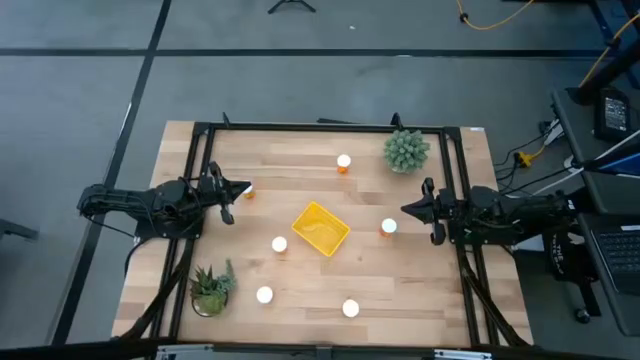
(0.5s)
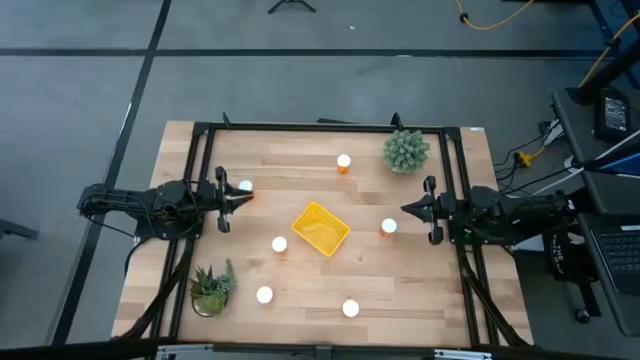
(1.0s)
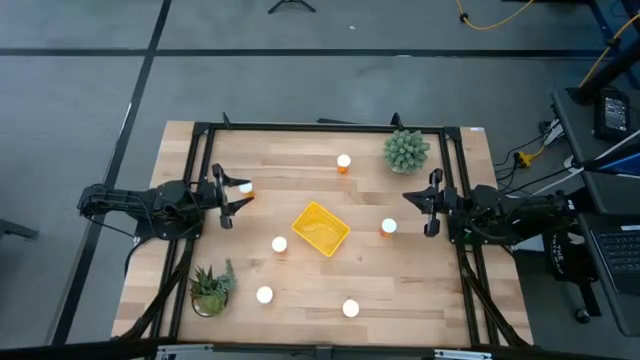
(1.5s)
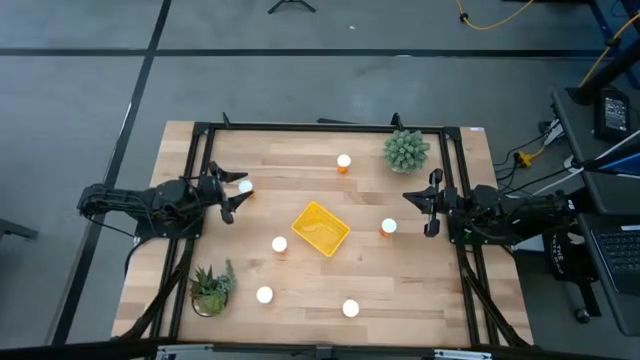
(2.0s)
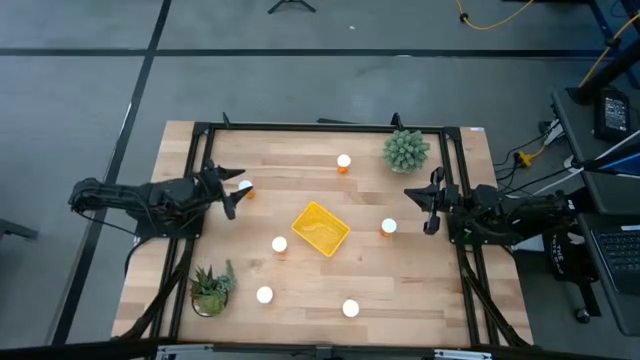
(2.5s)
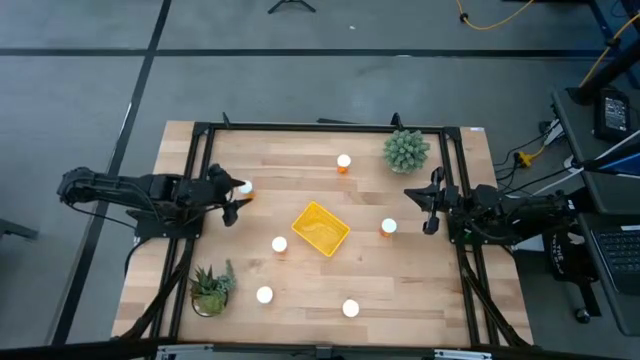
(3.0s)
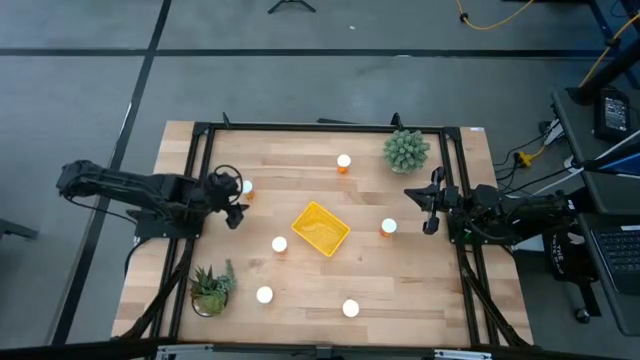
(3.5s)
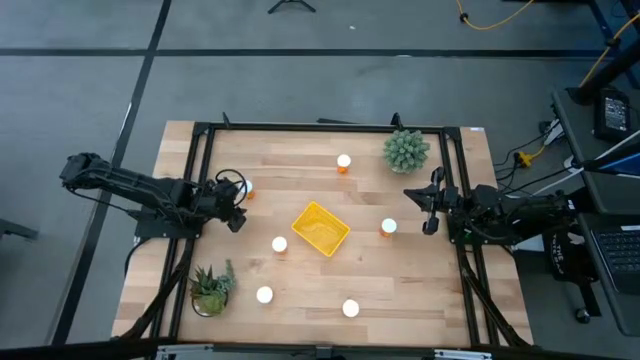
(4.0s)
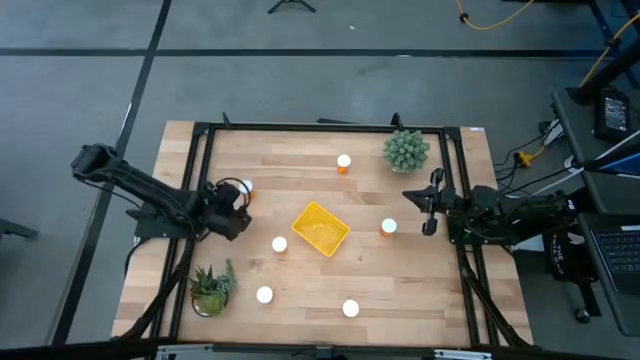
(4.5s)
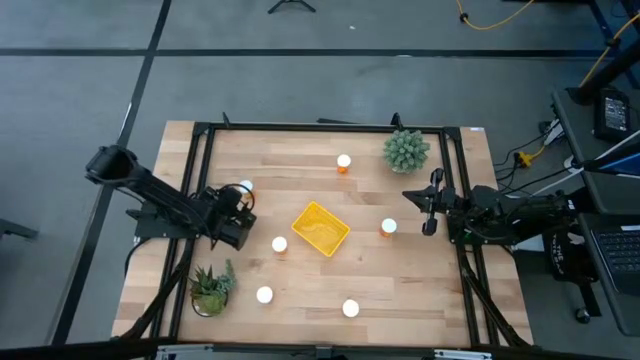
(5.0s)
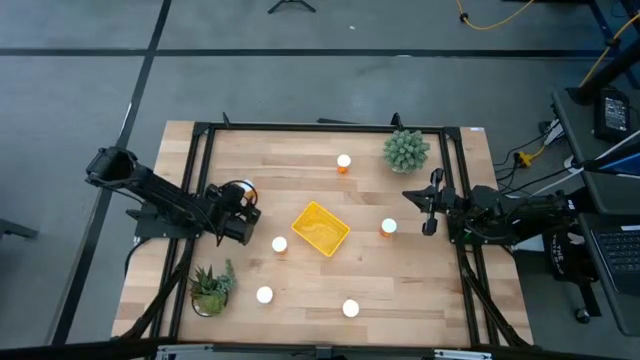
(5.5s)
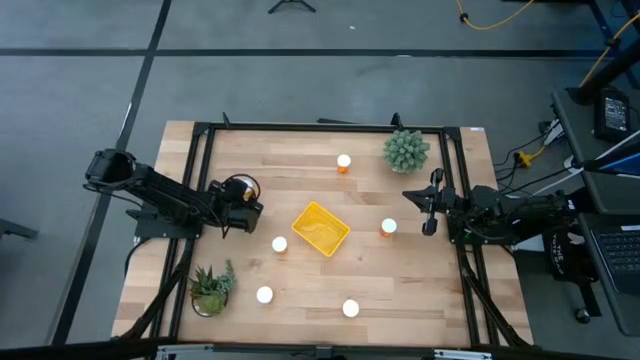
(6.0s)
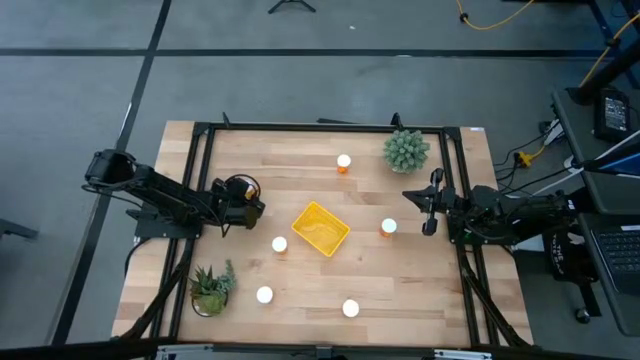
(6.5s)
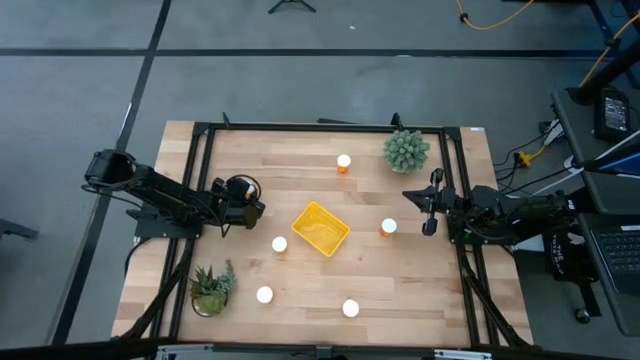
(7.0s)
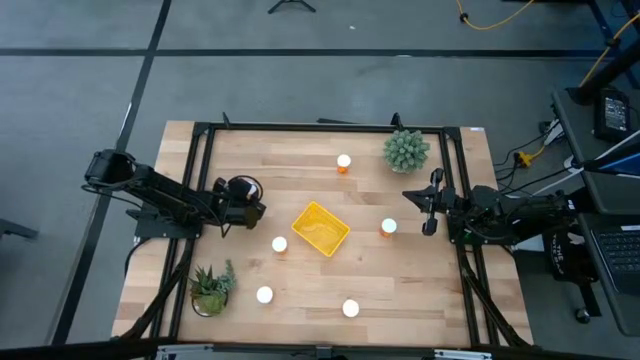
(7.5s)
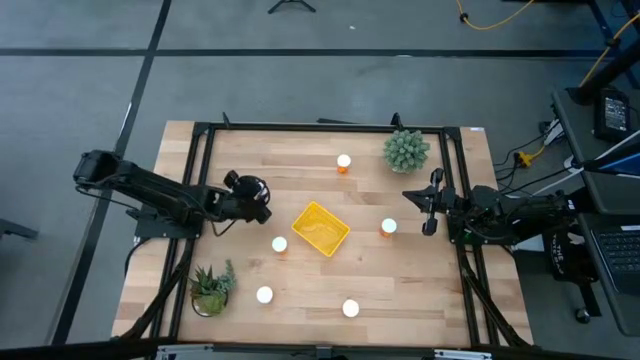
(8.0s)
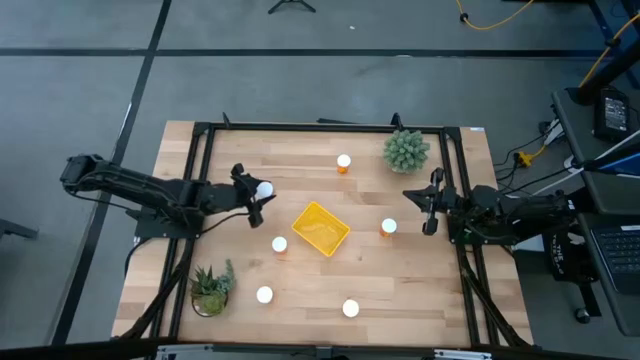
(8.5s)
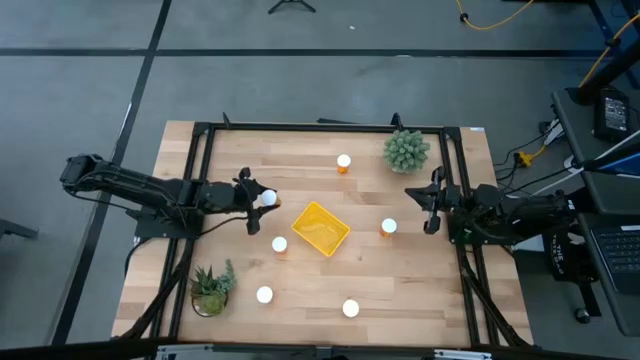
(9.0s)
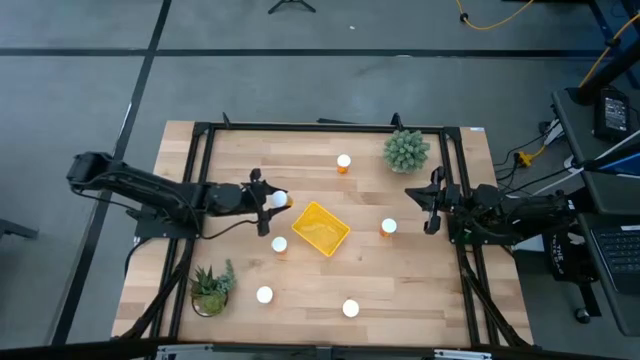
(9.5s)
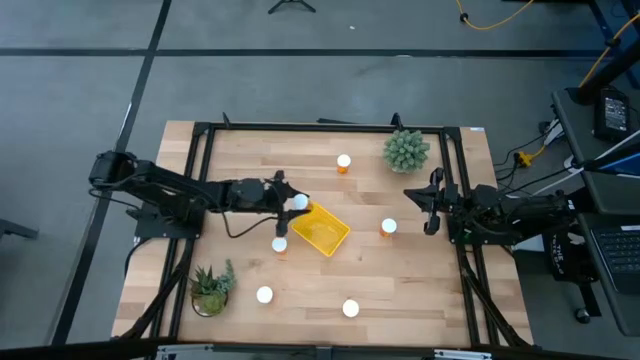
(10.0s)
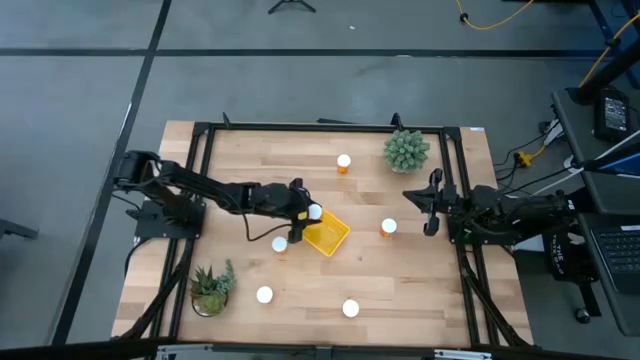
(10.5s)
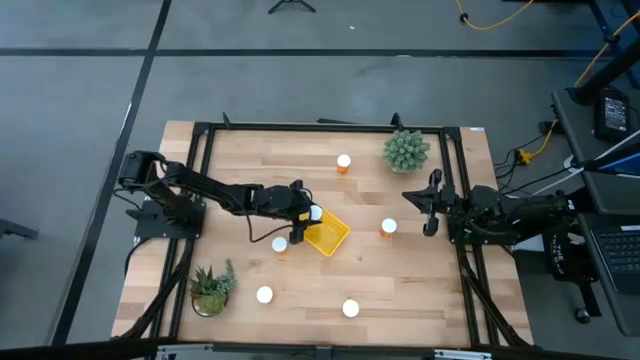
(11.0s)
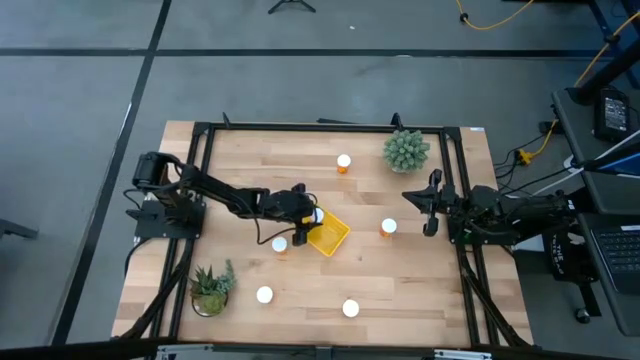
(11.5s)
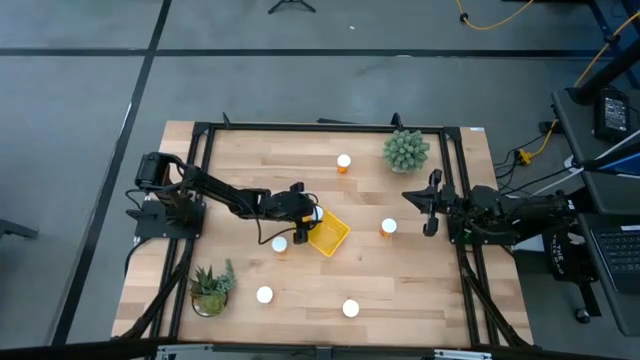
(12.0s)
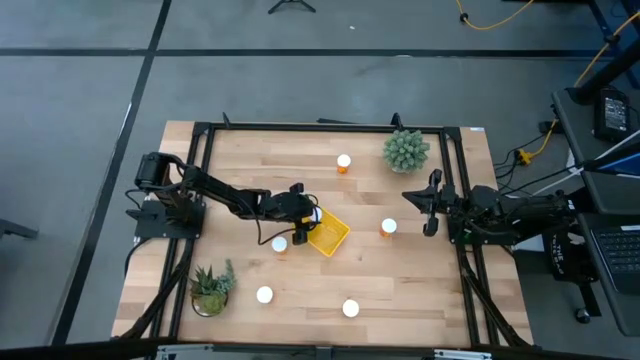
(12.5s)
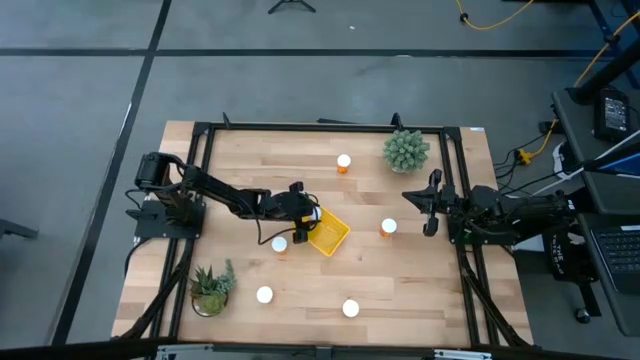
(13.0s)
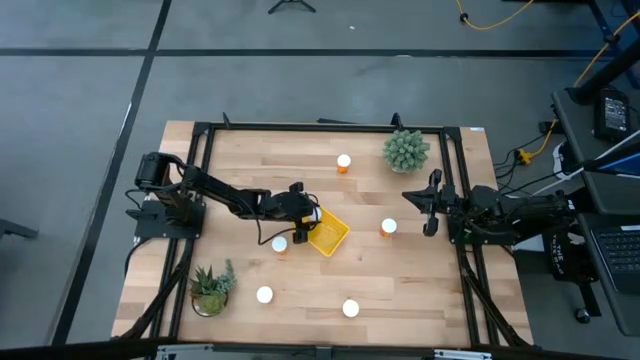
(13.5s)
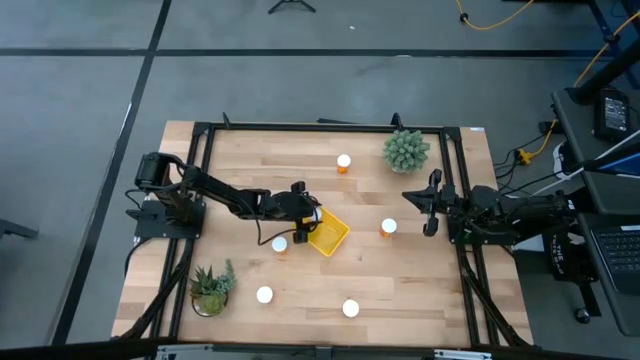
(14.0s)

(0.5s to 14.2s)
Task: Pick and place pill bottles into a basket
Put the orange pill bottle into the yellow bin
